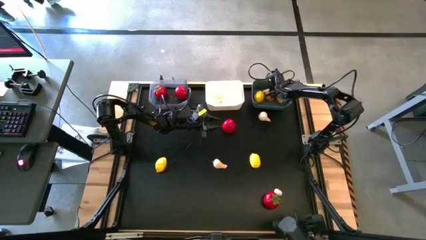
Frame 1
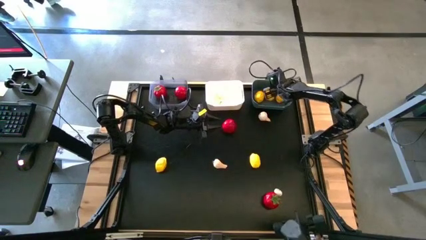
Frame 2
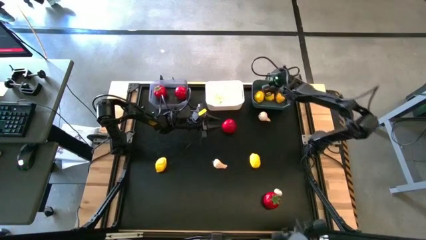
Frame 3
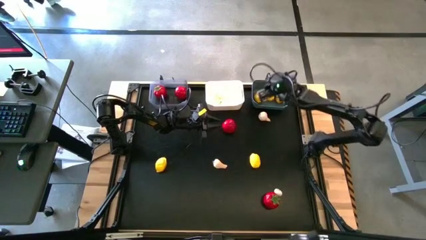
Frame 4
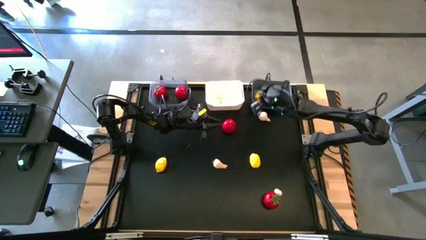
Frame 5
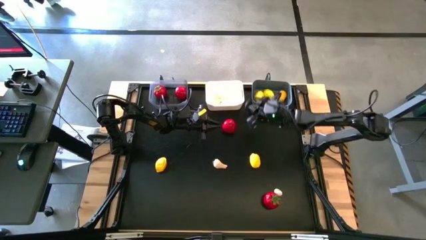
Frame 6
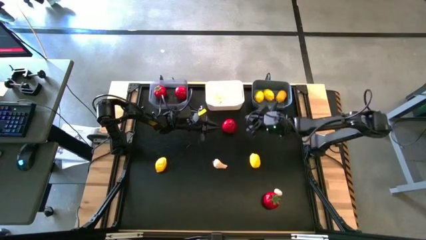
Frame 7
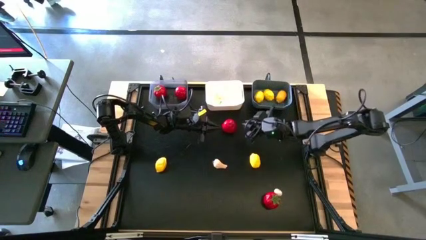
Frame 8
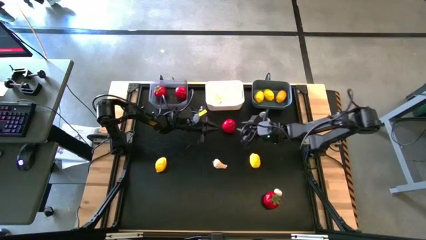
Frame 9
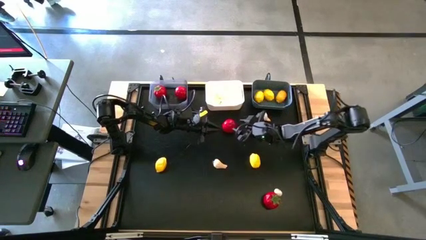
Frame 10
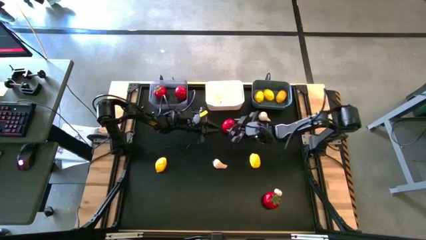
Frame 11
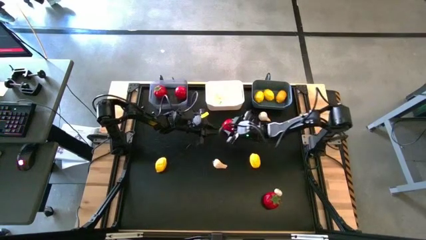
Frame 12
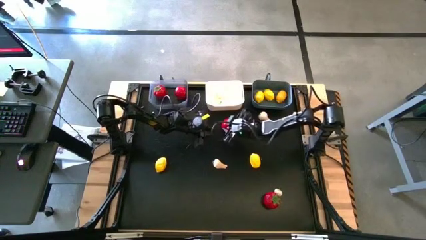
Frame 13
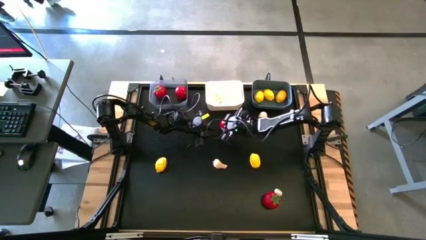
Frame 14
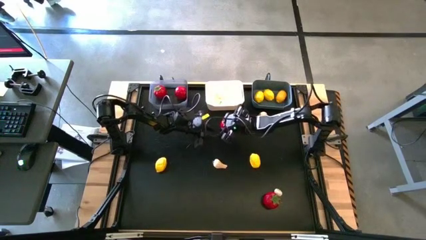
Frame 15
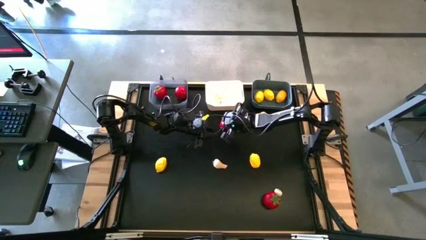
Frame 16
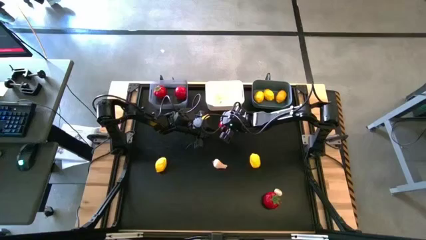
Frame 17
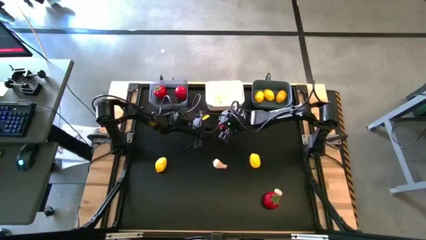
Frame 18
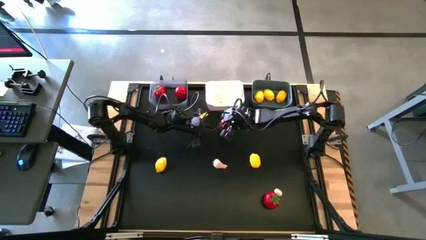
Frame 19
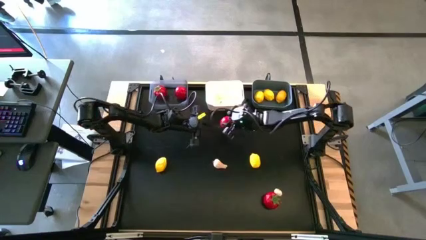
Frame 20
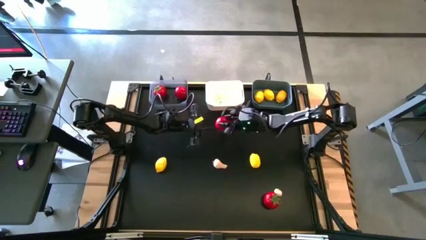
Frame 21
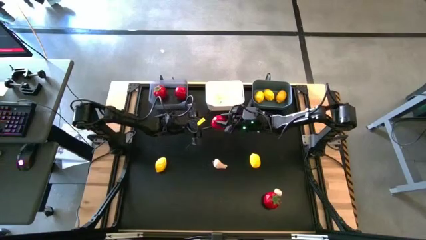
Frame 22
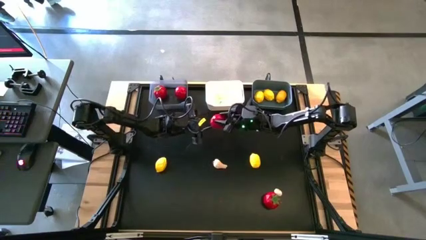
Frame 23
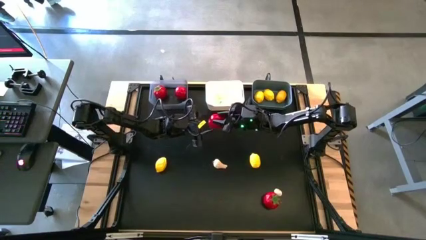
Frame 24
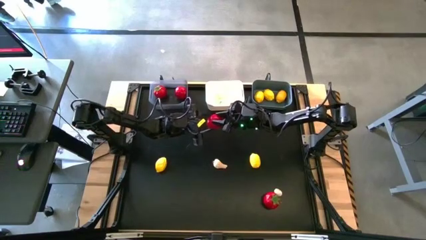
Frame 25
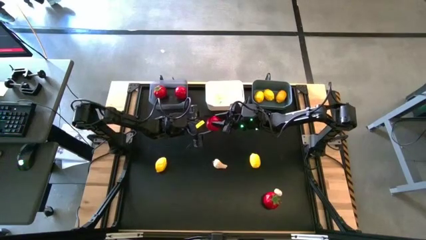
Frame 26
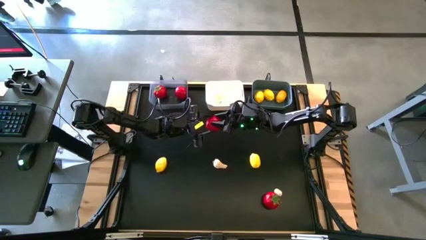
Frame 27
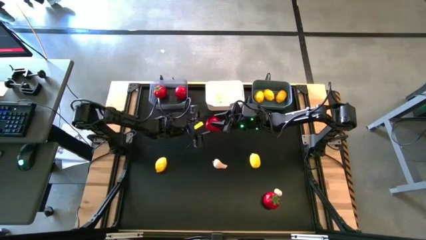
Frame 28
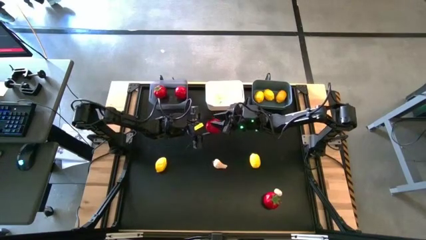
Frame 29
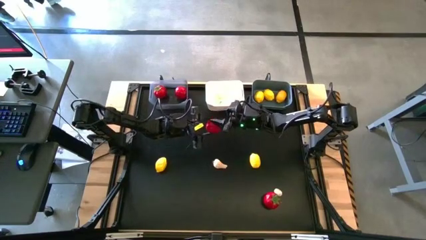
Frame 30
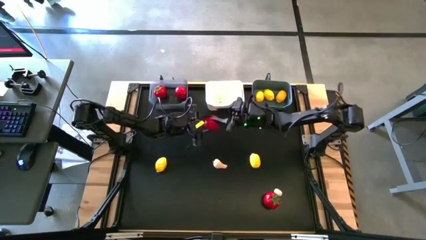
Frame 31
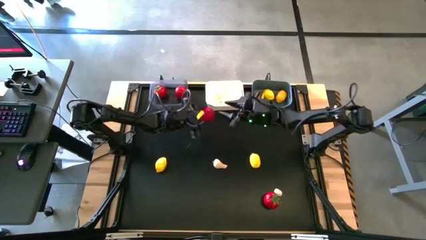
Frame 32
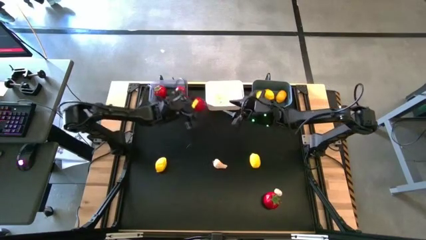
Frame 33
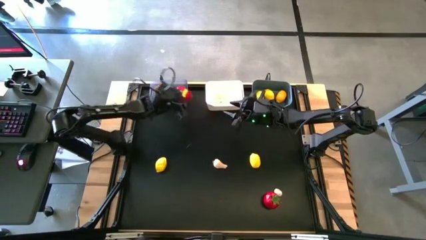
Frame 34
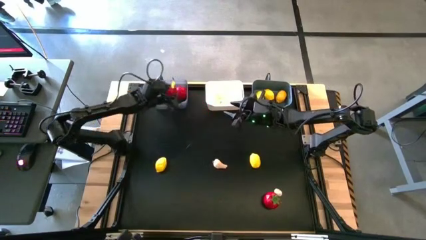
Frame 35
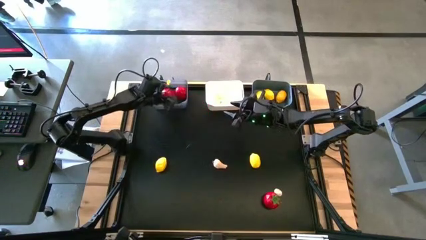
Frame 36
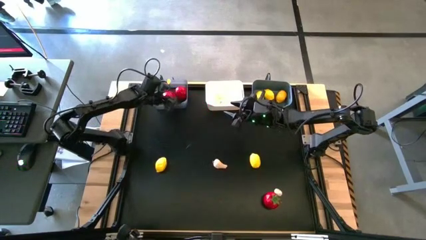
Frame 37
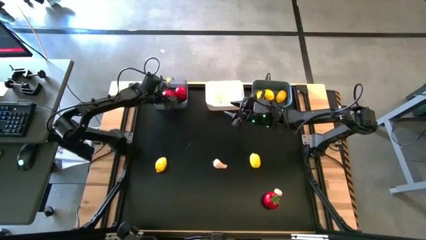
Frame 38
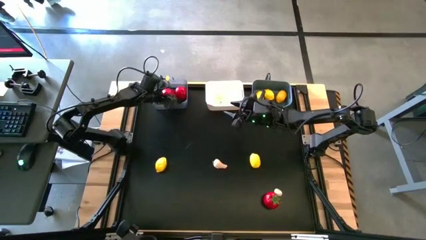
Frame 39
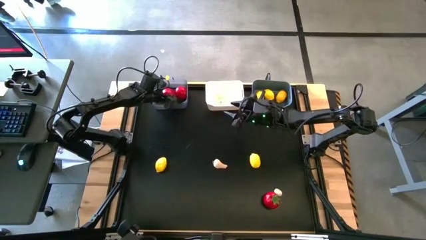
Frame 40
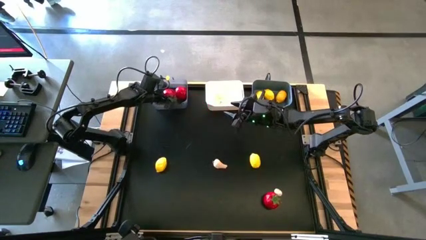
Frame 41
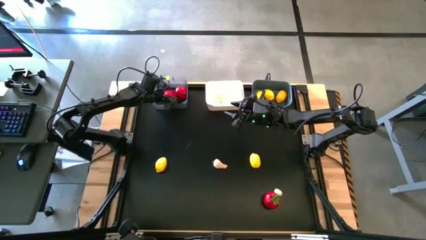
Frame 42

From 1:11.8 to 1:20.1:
Task: Sort produce into baskets
Put the tomato into the black bin

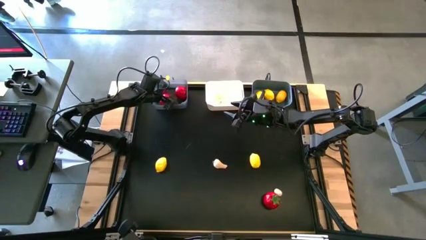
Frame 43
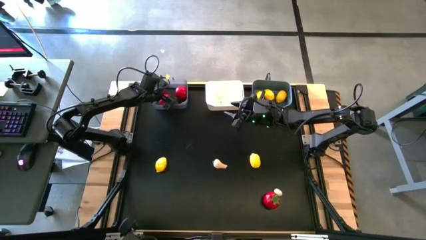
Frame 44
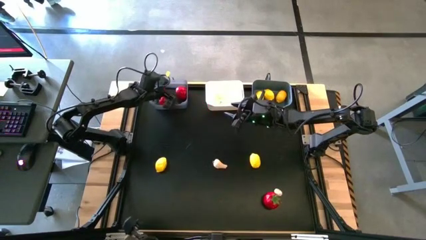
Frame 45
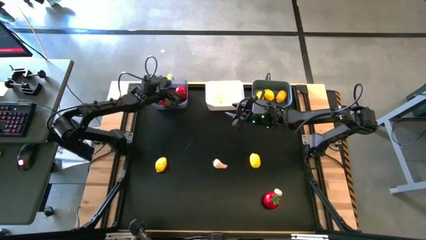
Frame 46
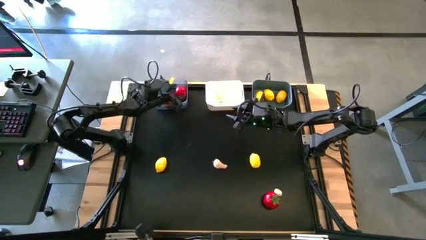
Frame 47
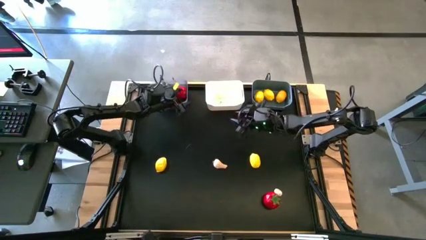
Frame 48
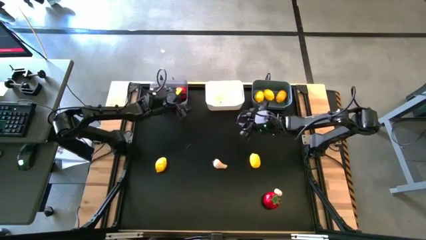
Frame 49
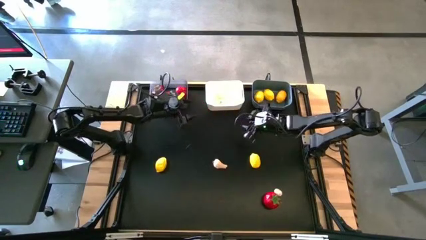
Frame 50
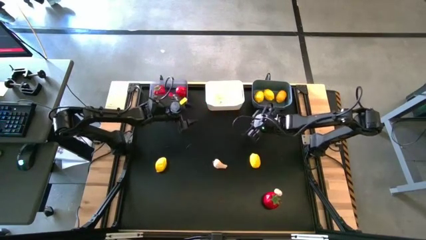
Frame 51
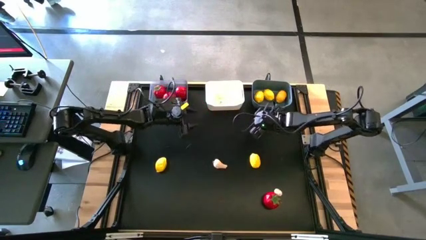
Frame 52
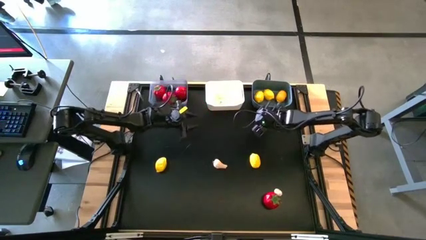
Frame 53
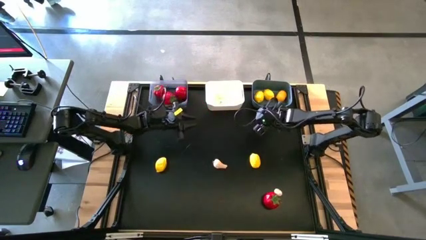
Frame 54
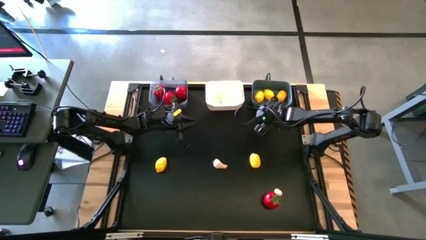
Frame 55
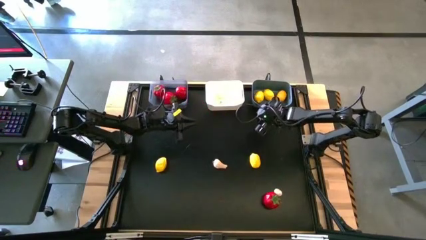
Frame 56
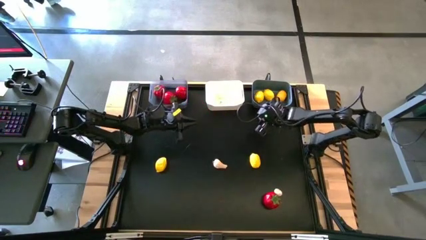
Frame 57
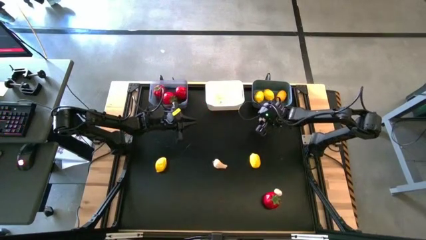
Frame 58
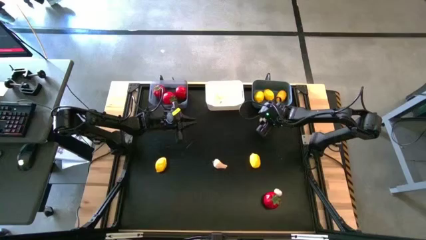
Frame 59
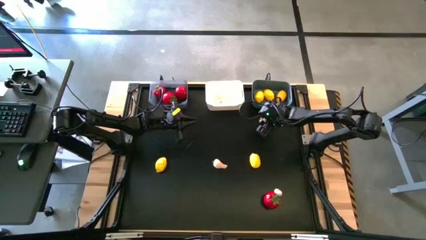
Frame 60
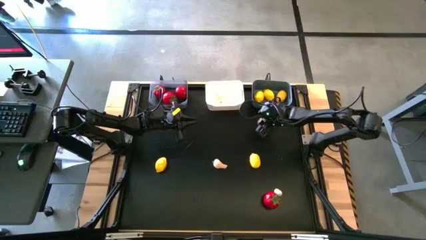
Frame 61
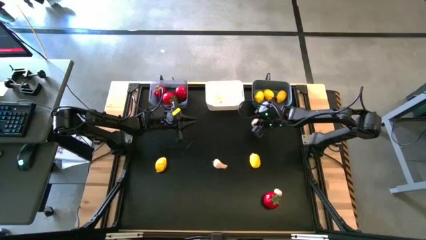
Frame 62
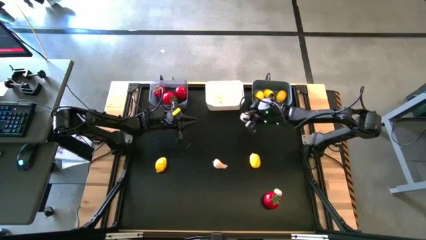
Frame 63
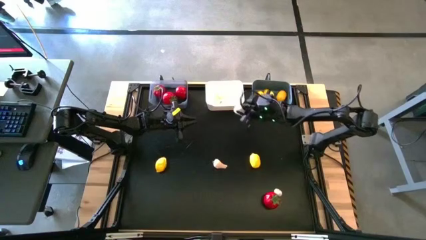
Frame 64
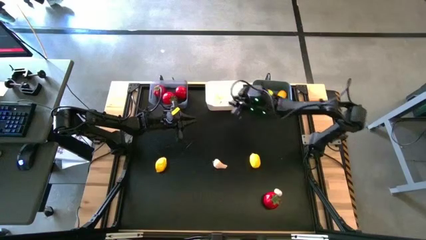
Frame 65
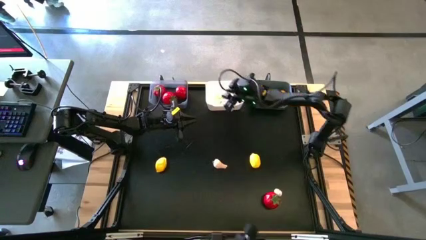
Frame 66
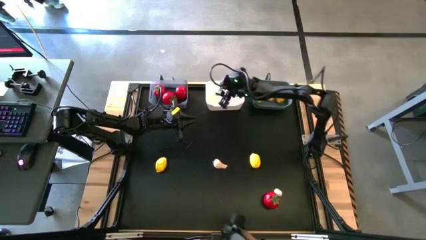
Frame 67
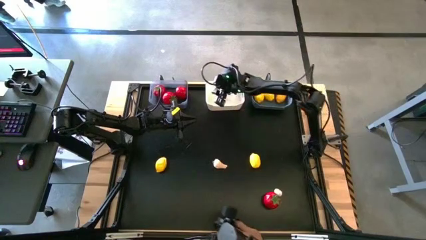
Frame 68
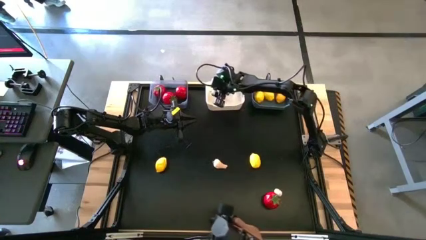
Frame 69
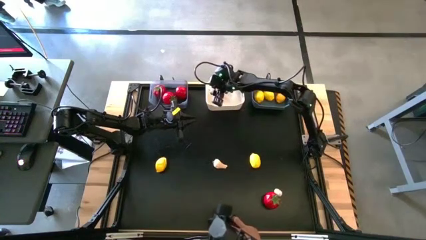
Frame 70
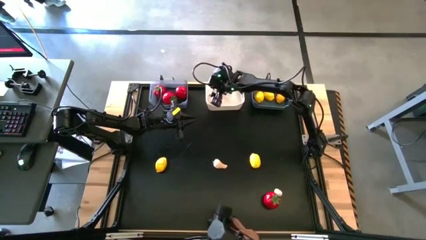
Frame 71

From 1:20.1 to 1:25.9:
Put the garlic into the white bin

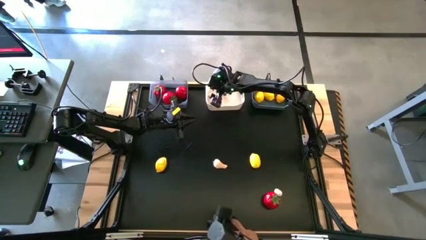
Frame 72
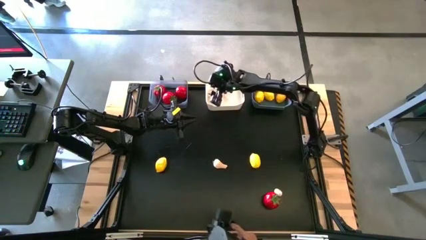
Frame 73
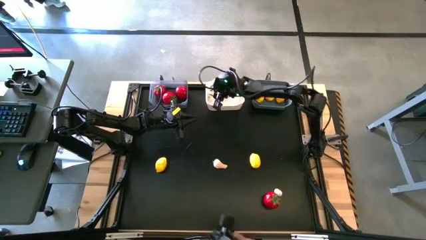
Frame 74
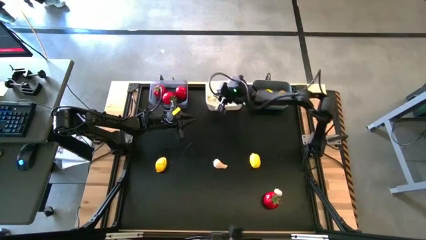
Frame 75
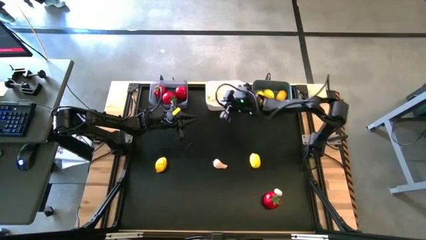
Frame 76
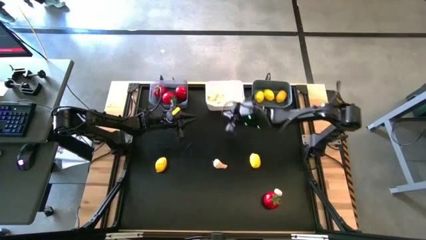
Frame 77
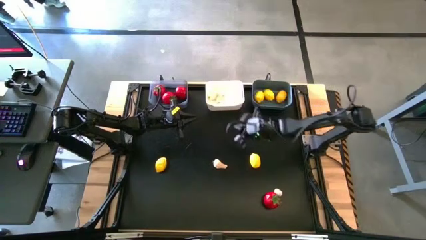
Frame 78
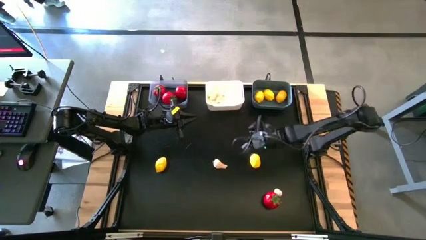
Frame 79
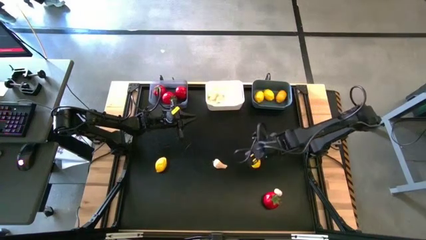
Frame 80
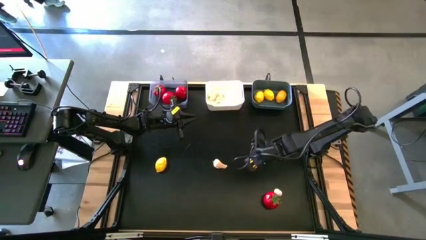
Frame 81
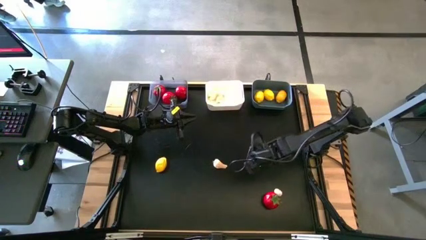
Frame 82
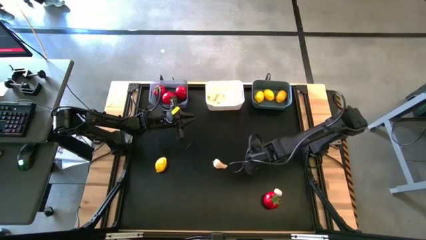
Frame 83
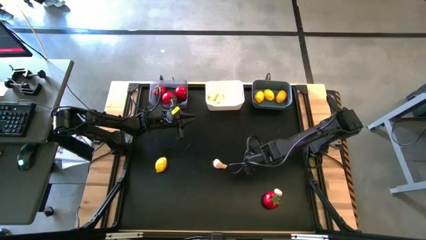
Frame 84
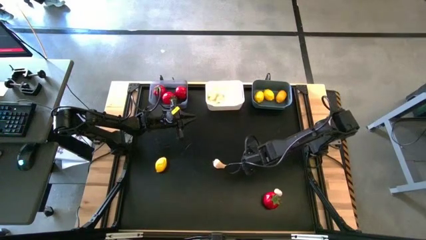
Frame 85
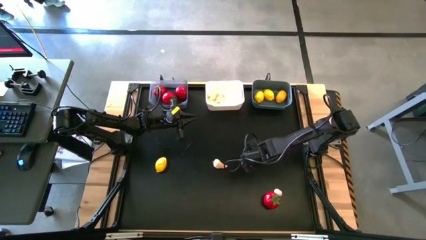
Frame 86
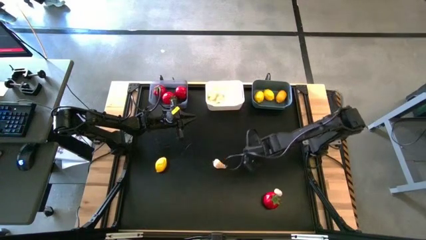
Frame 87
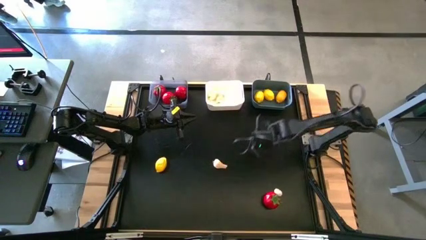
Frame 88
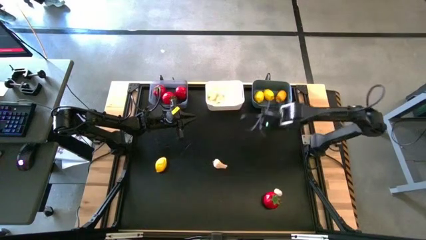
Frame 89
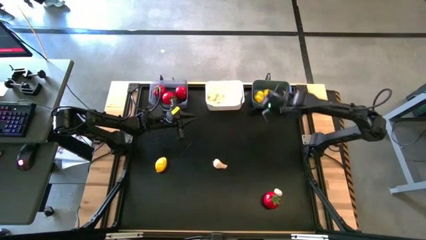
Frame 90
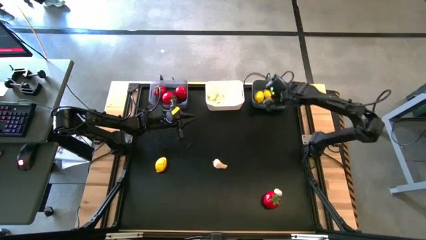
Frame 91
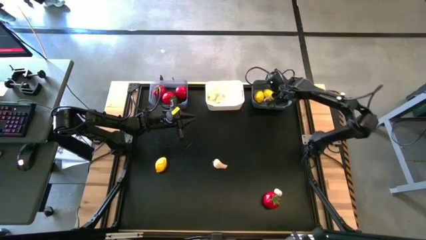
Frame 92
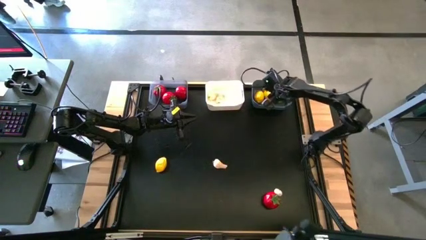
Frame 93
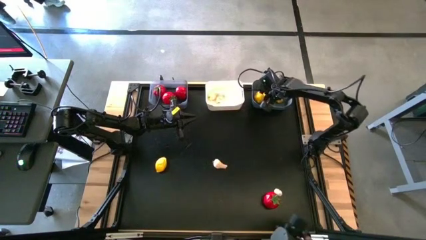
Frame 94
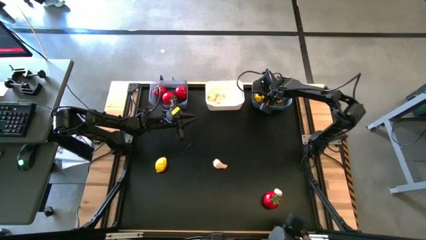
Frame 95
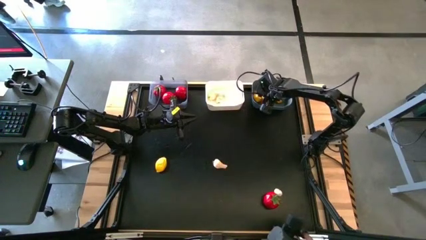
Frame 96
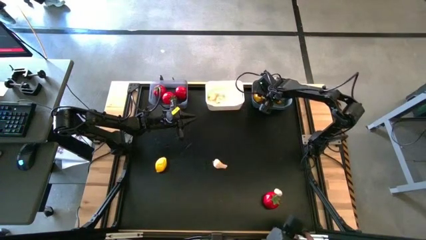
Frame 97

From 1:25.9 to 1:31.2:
Put the lemon into the blue bin
